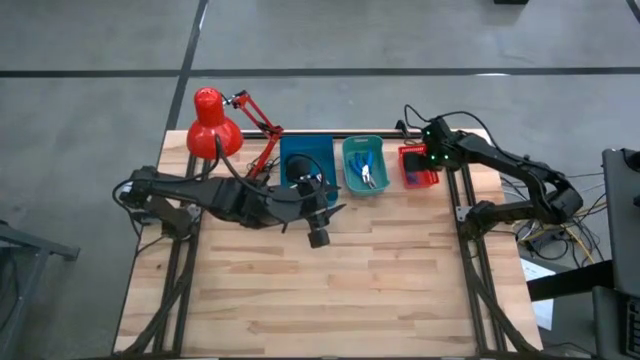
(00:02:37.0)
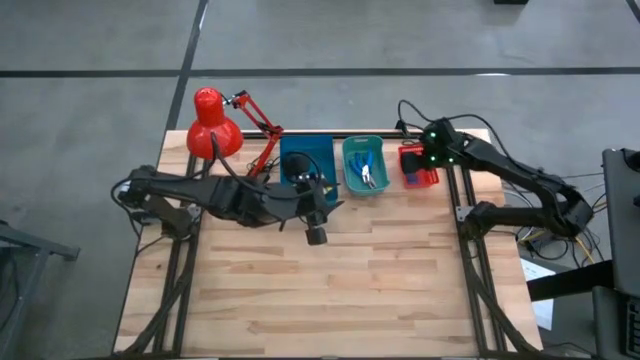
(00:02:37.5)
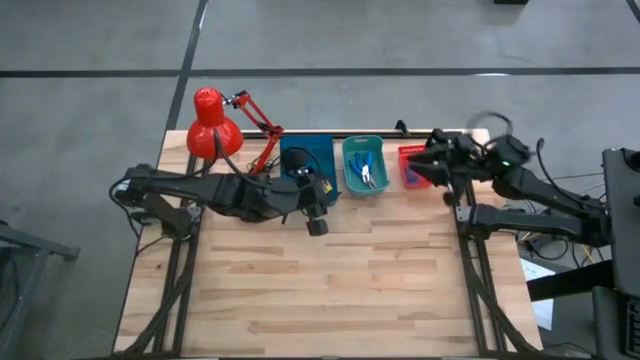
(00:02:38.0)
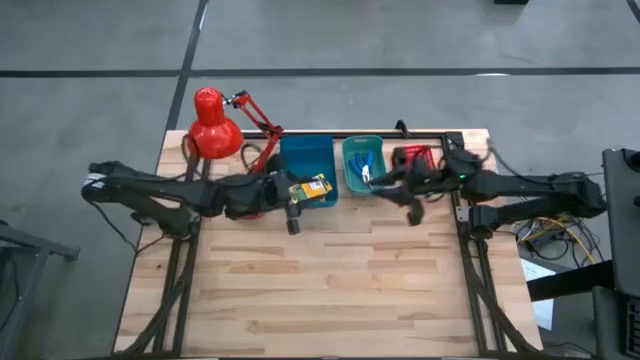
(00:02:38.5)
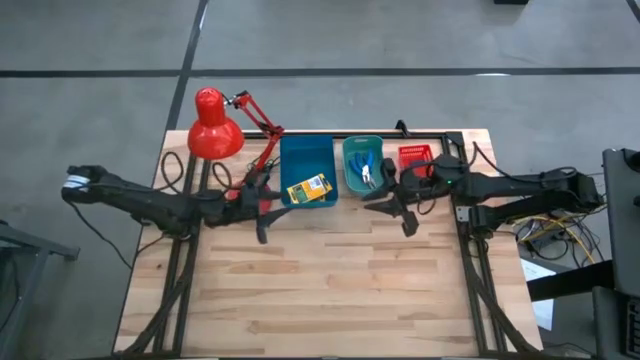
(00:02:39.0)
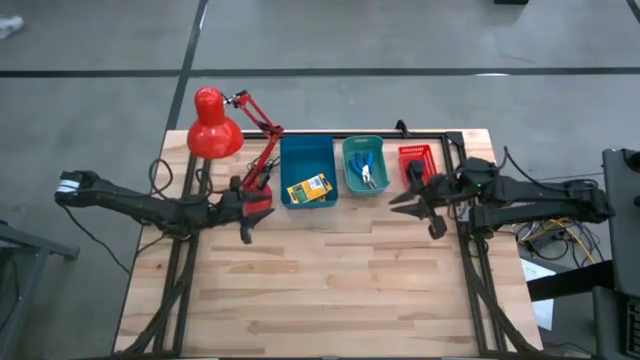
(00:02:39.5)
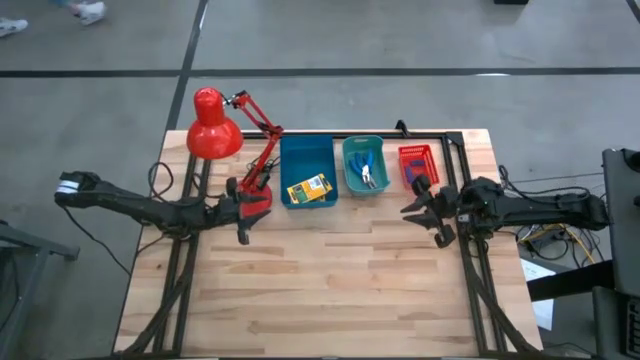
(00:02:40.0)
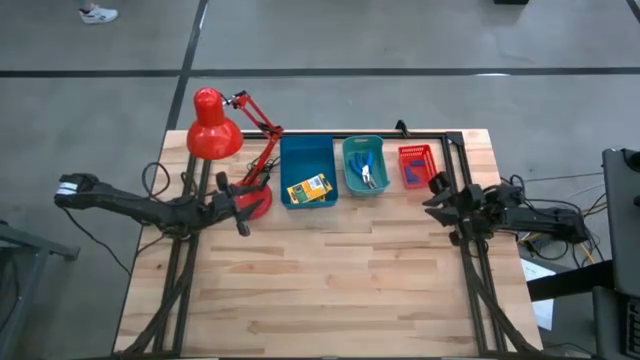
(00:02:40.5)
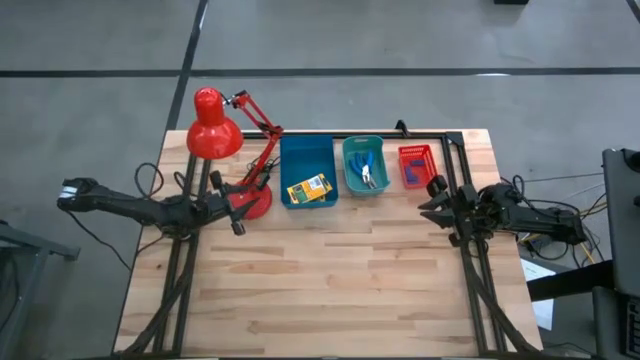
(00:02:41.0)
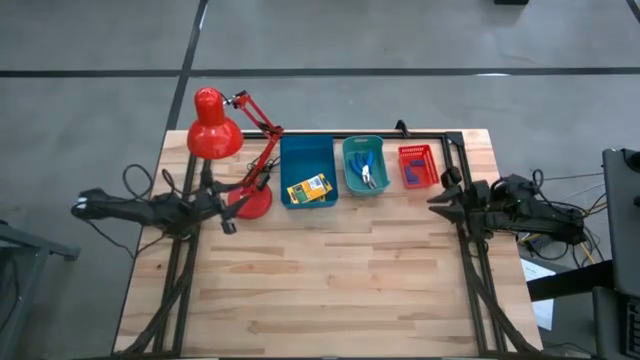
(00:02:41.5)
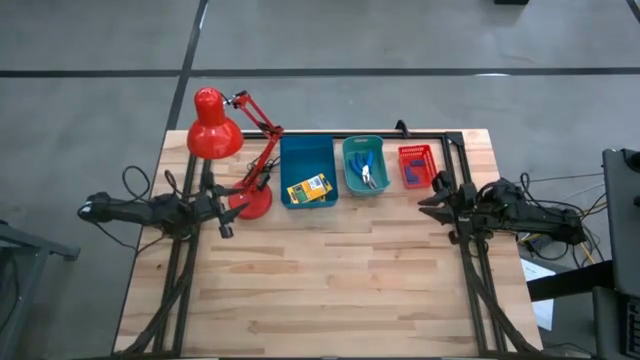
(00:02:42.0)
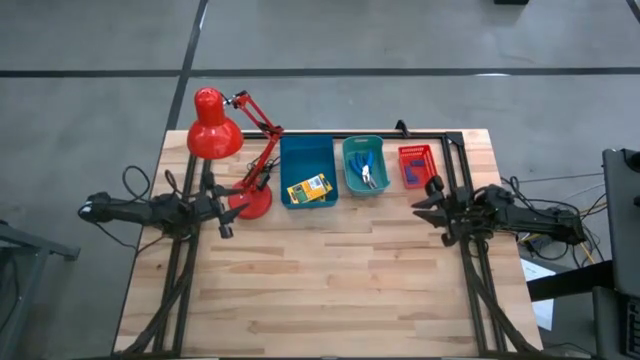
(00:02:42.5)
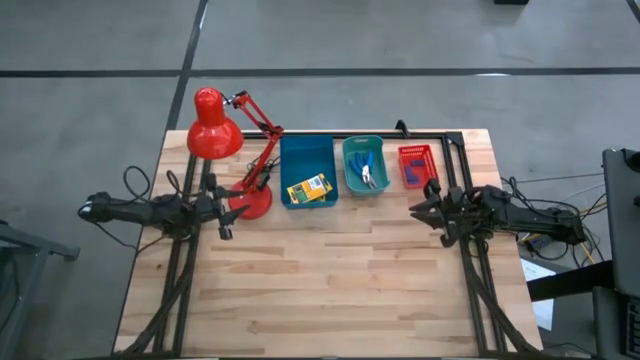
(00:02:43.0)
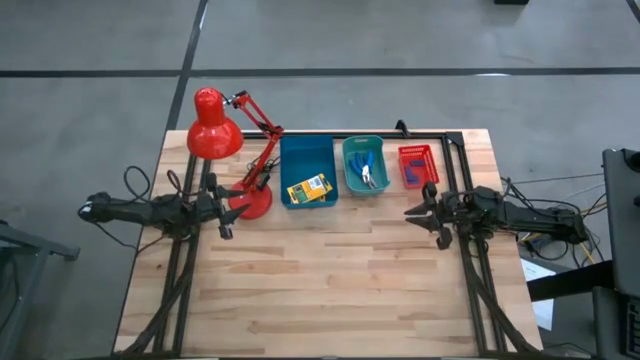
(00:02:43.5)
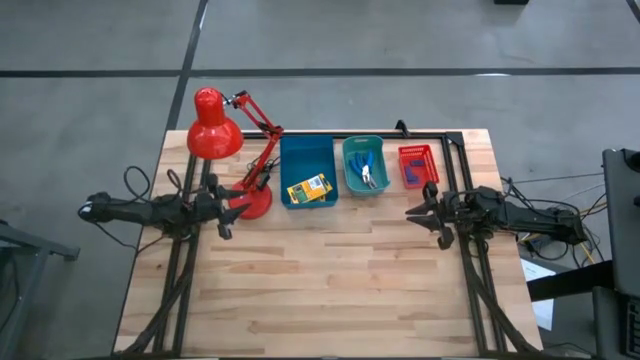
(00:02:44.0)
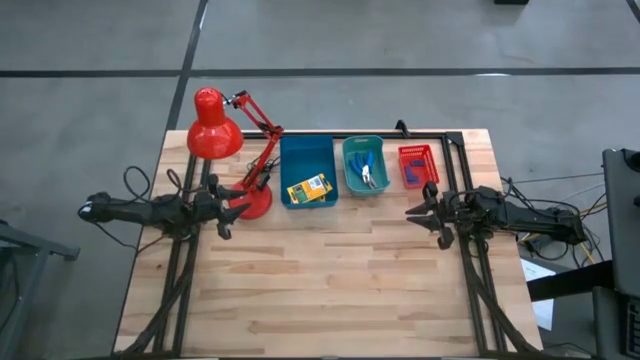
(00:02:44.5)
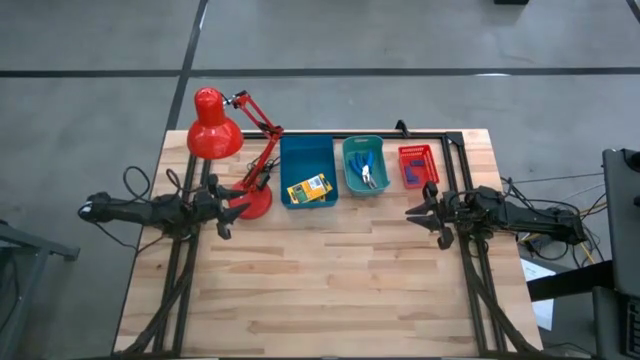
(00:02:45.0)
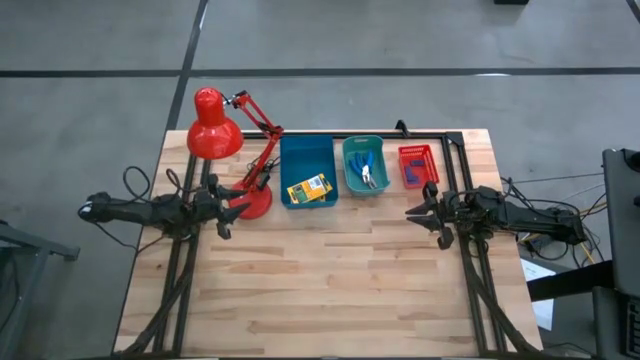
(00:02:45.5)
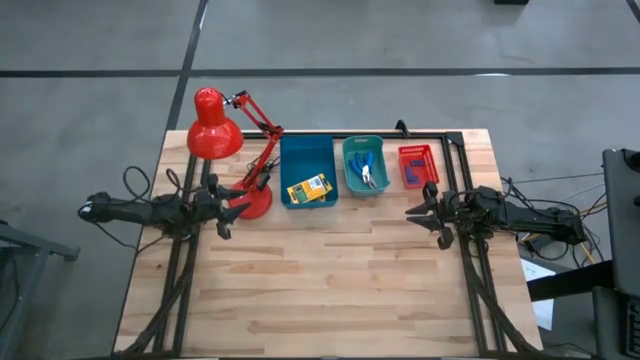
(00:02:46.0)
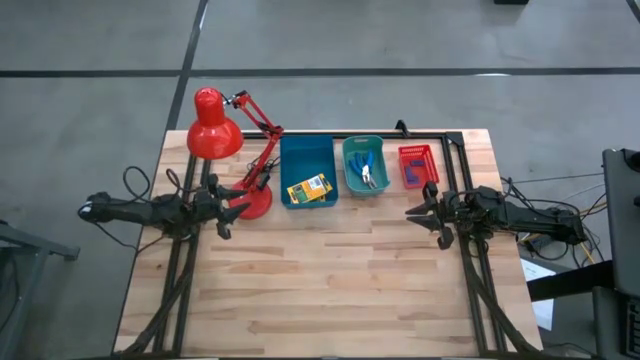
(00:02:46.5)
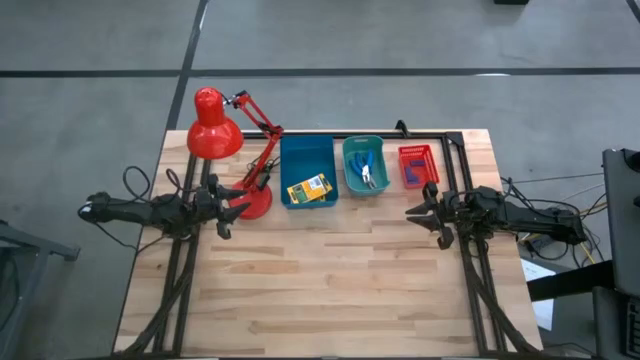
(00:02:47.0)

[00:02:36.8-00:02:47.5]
Task: Pick & Place School Supplies
Return to Home Position

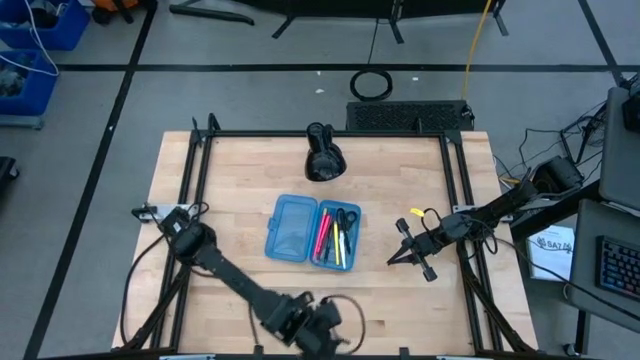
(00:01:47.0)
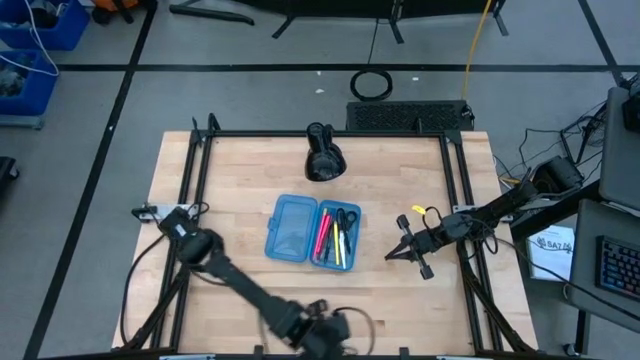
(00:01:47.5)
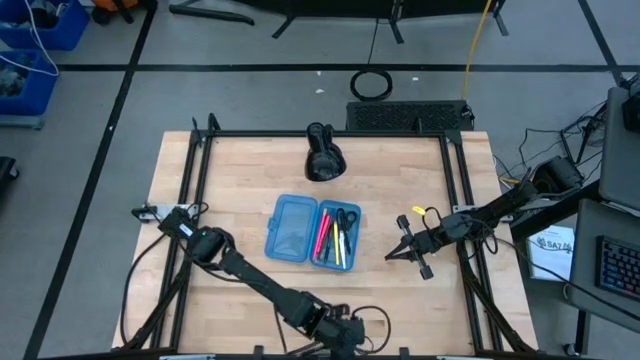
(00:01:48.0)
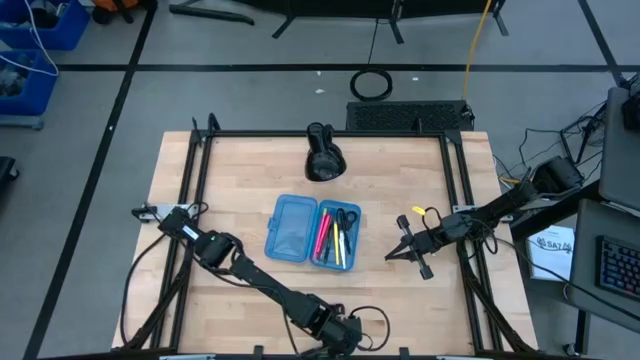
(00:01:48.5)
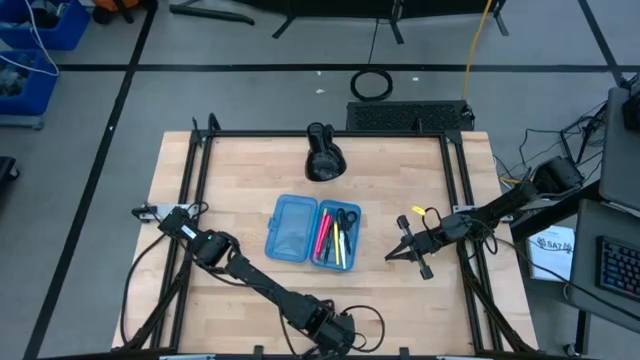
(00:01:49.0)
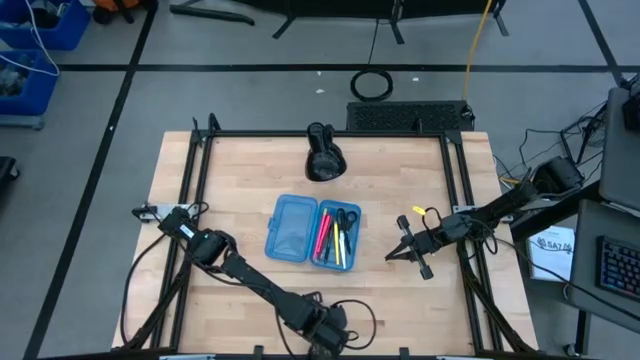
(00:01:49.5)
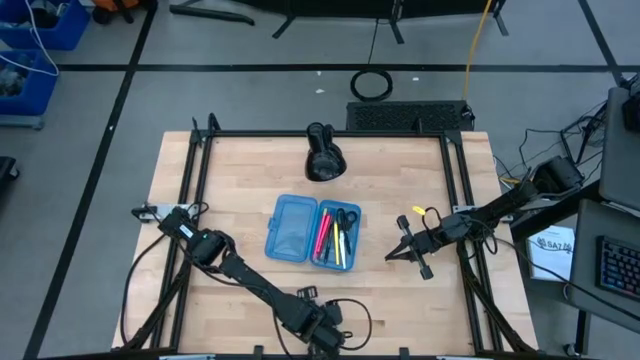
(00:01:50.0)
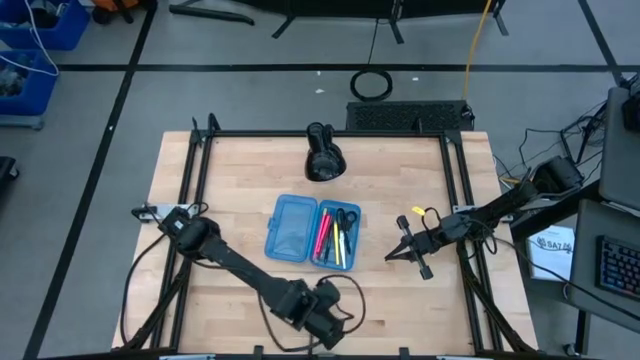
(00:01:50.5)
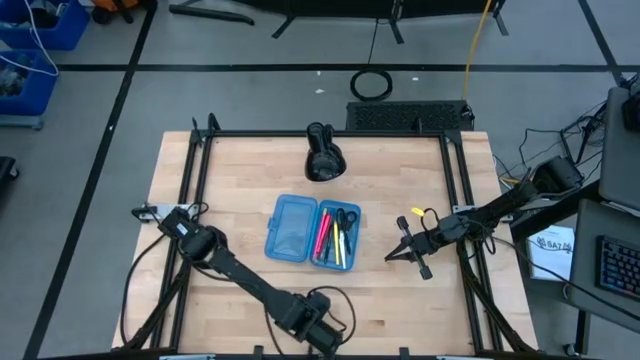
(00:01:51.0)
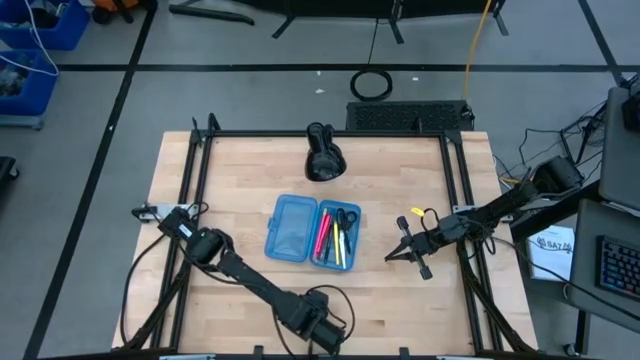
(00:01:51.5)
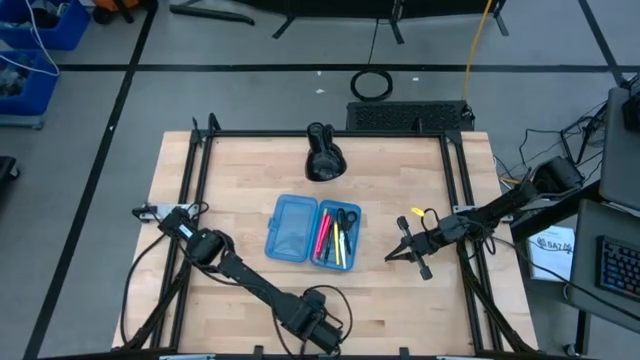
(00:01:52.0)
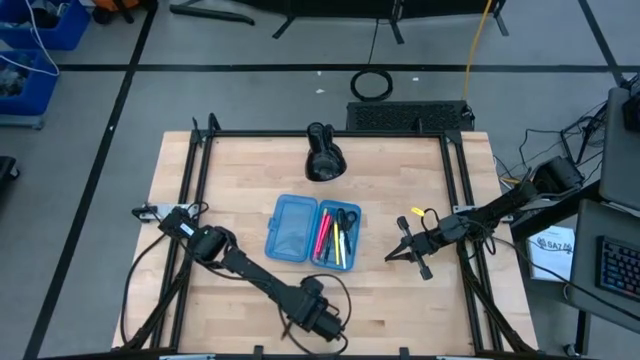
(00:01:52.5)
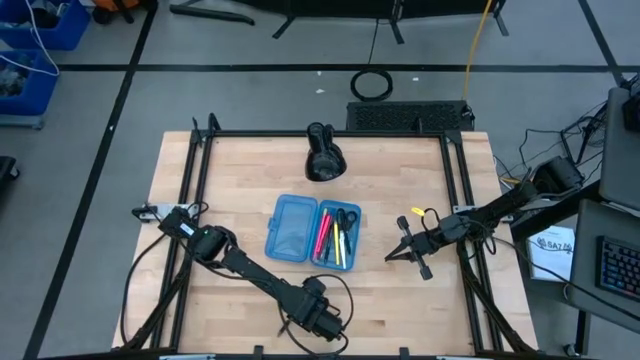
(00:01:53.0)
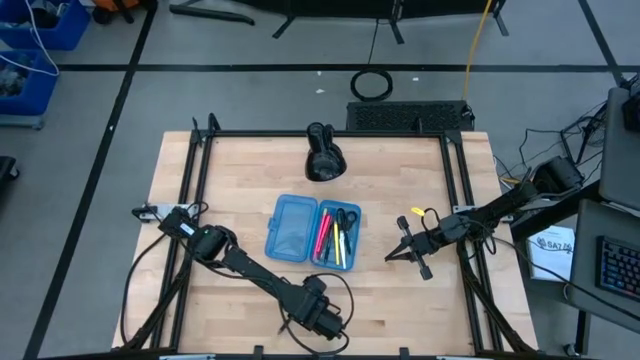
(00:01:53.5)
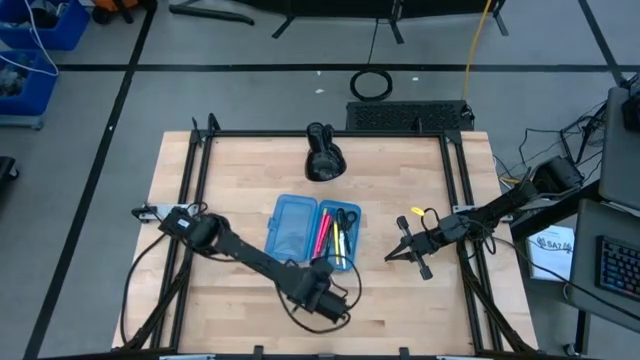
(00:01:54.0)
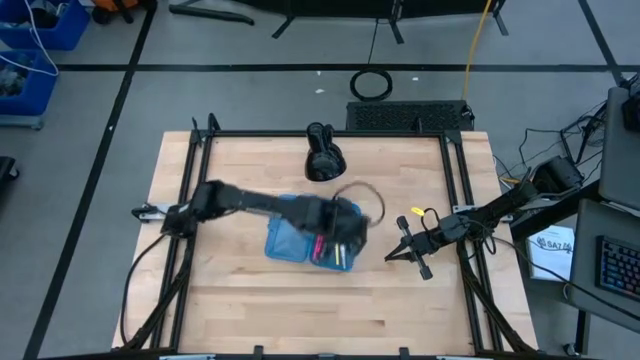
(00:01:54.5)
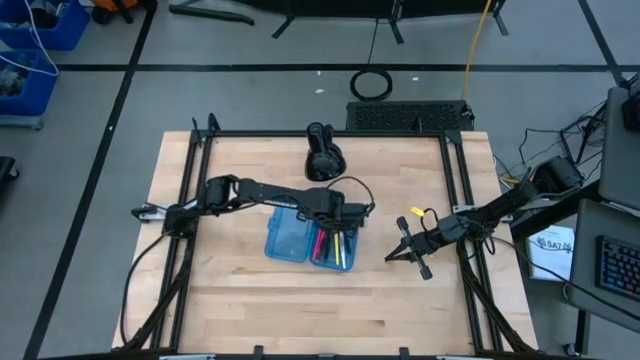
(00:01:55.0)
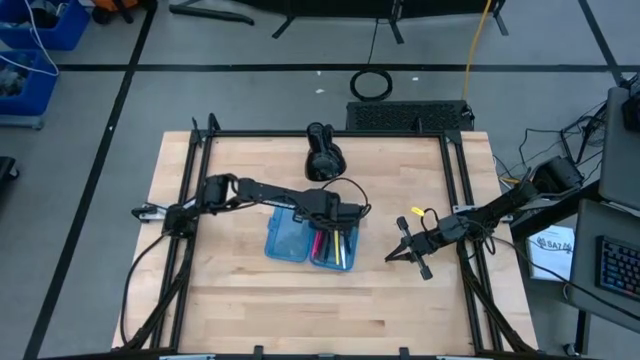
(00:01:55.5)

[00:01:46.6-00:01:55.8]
Task: Pick & place school supplies into a supply box
Put the black pen into the blue supply box
